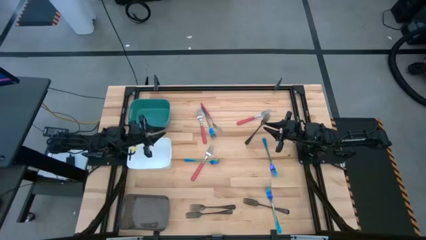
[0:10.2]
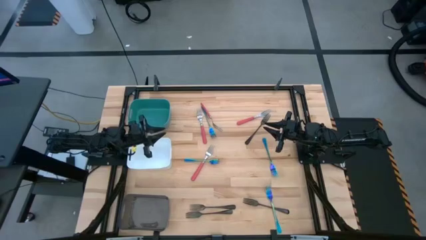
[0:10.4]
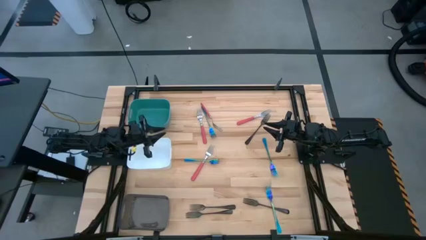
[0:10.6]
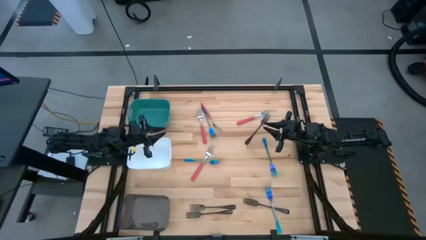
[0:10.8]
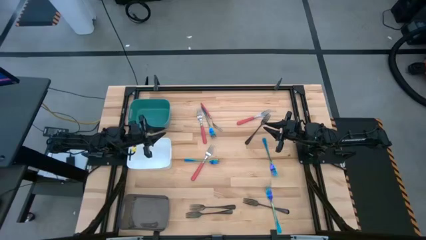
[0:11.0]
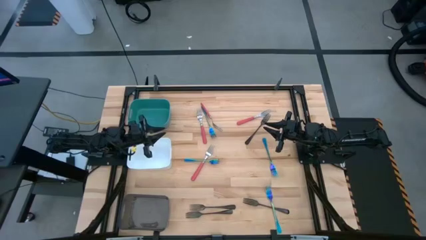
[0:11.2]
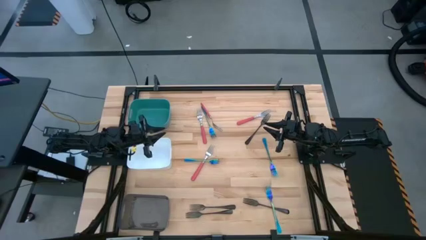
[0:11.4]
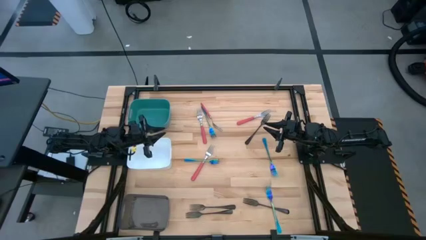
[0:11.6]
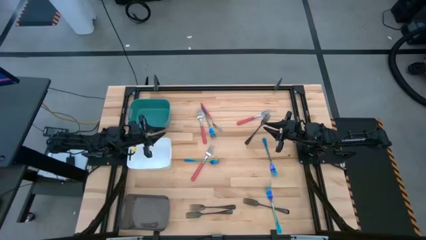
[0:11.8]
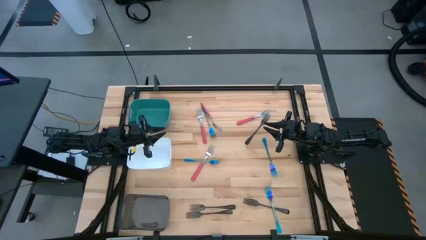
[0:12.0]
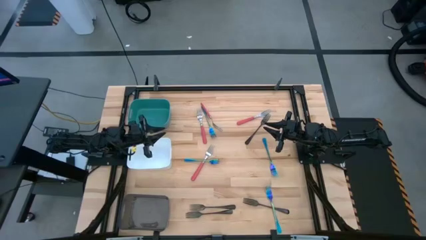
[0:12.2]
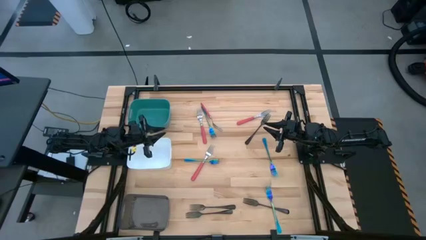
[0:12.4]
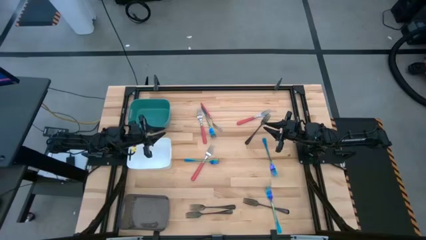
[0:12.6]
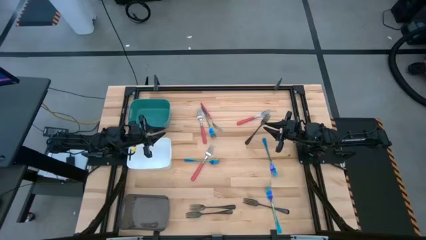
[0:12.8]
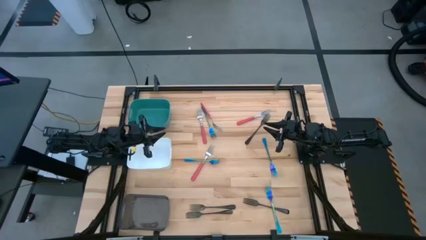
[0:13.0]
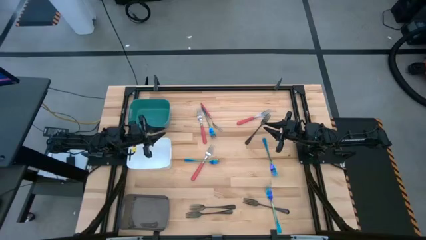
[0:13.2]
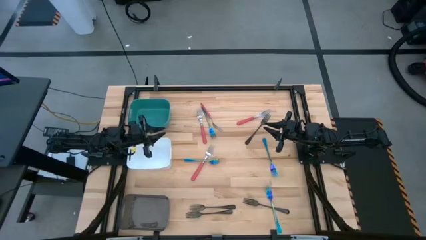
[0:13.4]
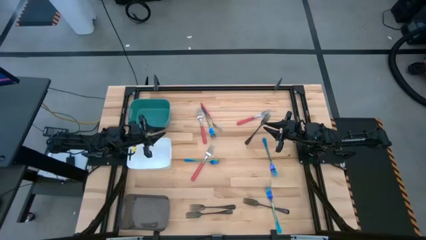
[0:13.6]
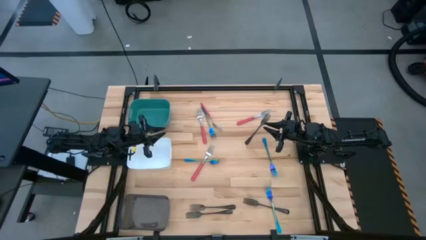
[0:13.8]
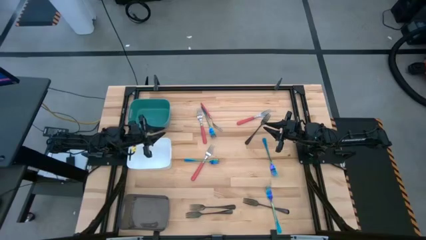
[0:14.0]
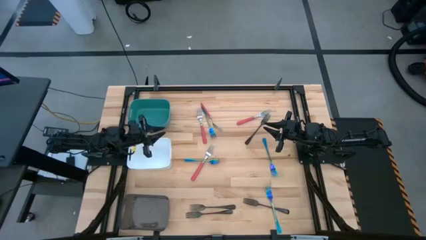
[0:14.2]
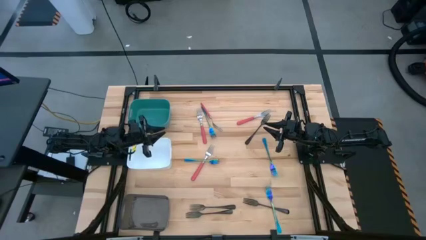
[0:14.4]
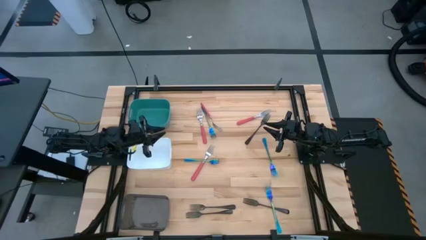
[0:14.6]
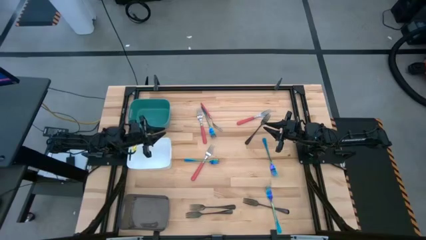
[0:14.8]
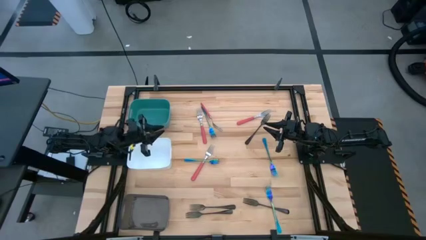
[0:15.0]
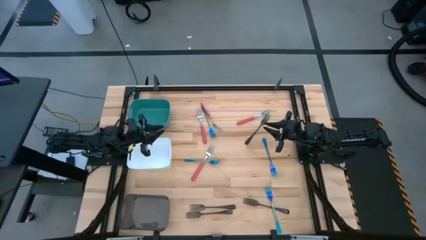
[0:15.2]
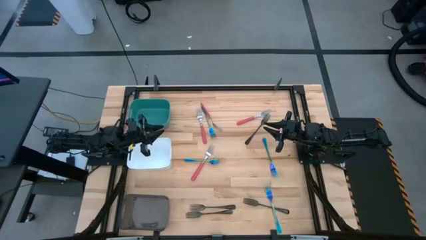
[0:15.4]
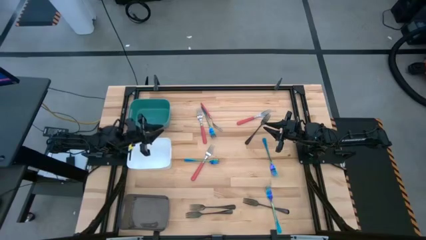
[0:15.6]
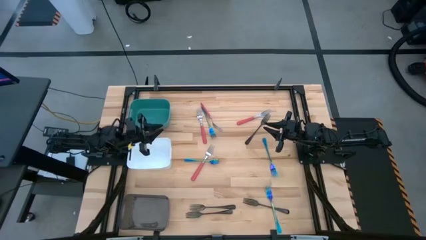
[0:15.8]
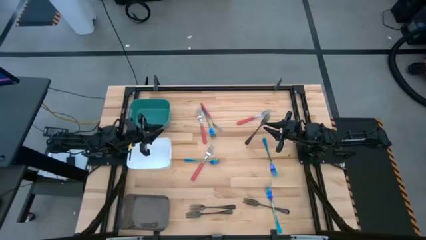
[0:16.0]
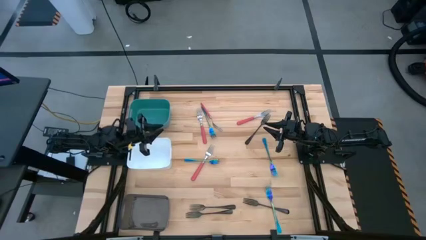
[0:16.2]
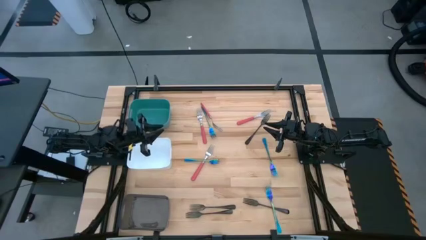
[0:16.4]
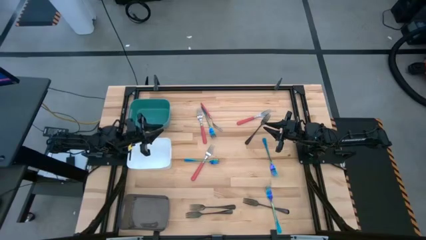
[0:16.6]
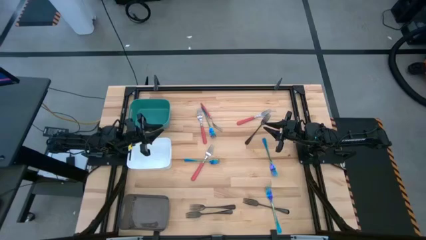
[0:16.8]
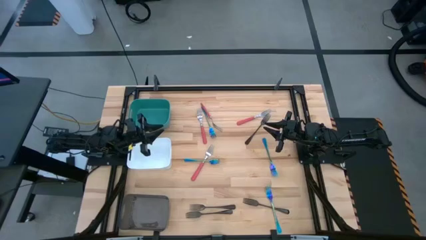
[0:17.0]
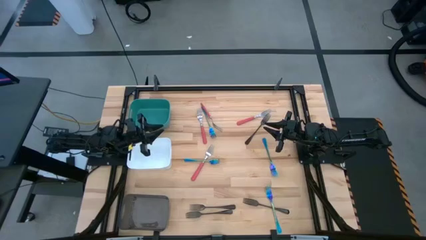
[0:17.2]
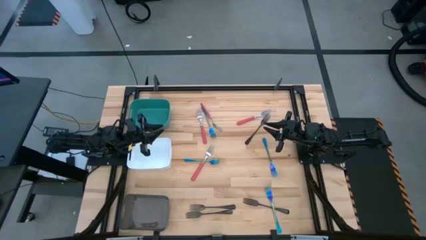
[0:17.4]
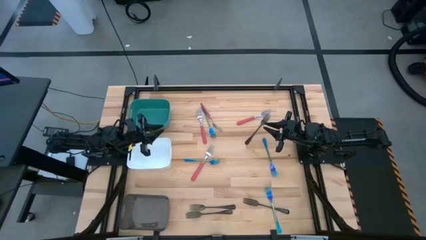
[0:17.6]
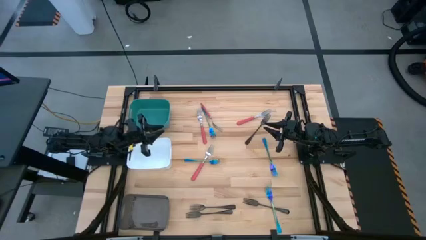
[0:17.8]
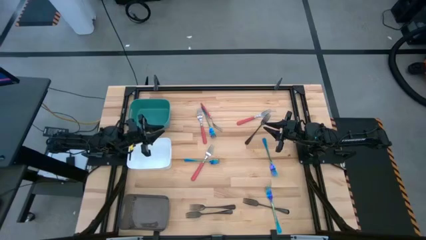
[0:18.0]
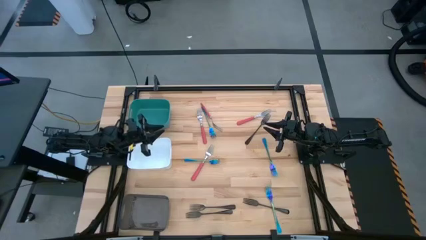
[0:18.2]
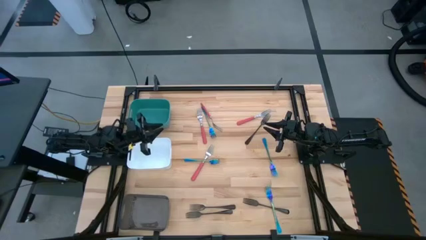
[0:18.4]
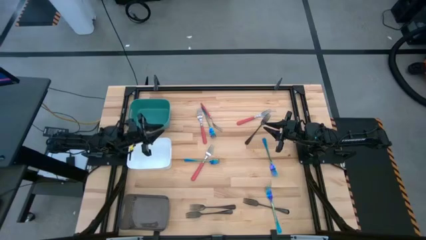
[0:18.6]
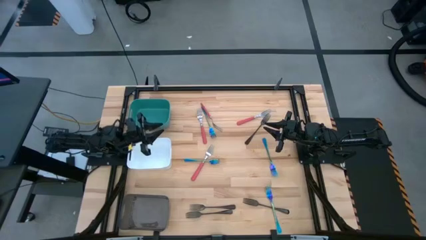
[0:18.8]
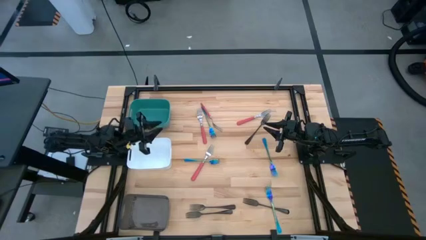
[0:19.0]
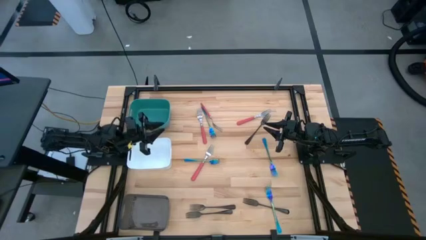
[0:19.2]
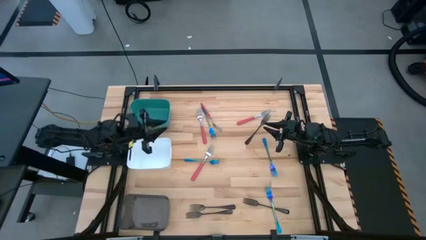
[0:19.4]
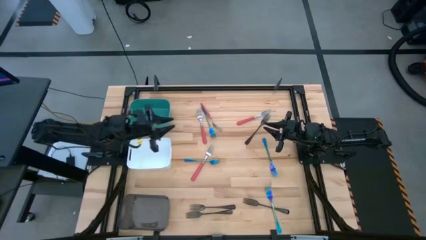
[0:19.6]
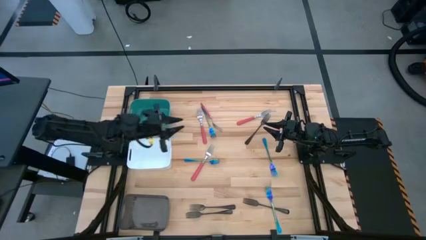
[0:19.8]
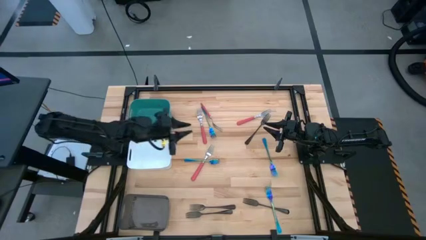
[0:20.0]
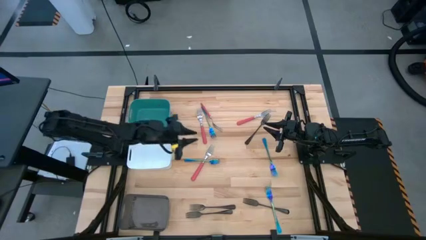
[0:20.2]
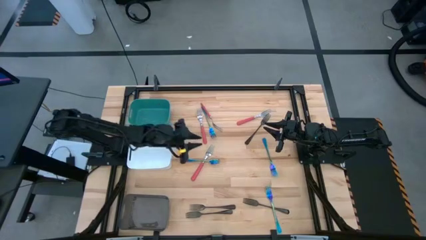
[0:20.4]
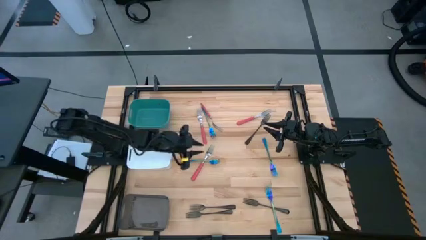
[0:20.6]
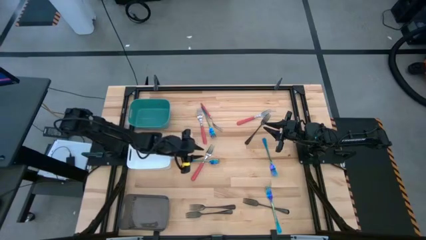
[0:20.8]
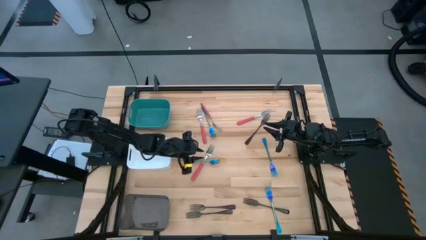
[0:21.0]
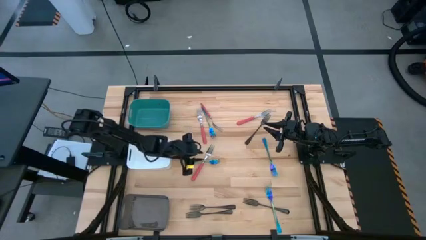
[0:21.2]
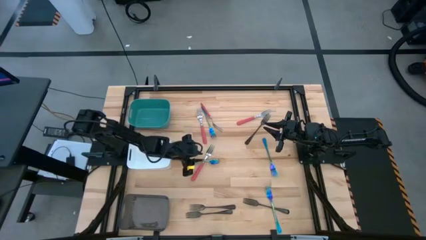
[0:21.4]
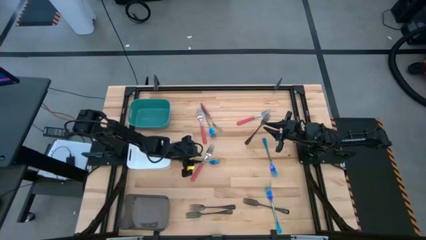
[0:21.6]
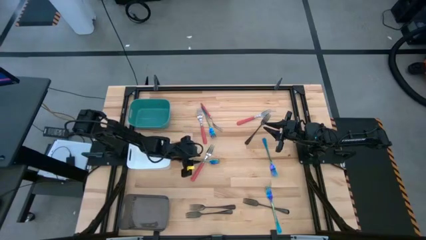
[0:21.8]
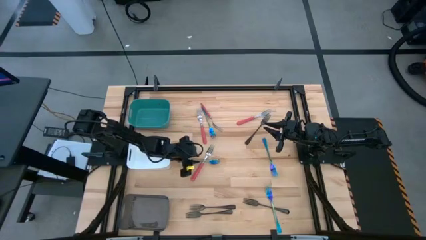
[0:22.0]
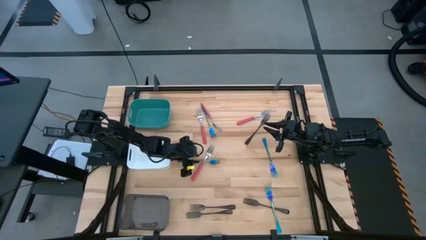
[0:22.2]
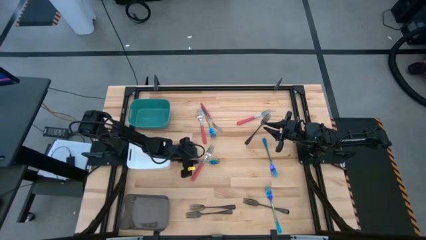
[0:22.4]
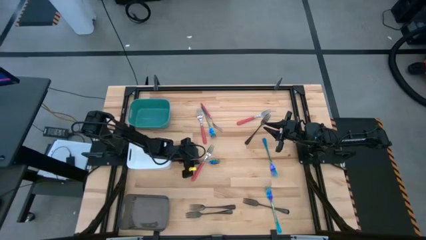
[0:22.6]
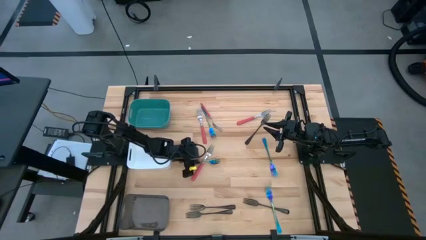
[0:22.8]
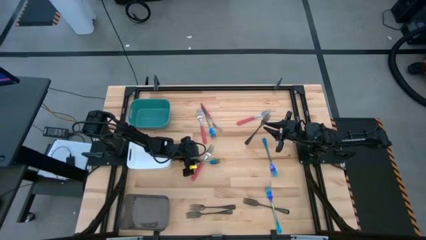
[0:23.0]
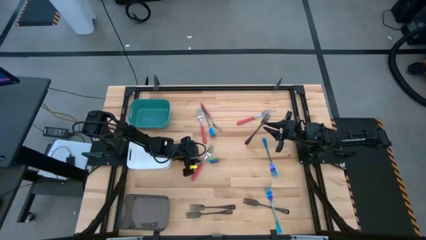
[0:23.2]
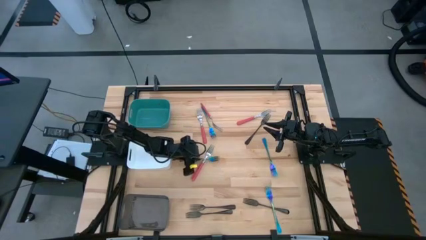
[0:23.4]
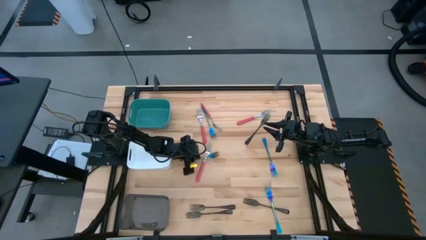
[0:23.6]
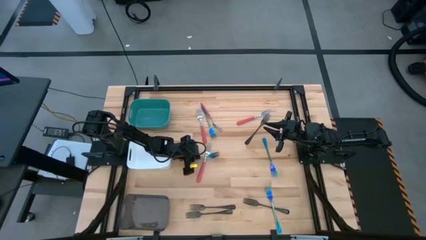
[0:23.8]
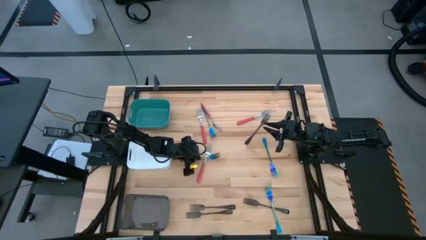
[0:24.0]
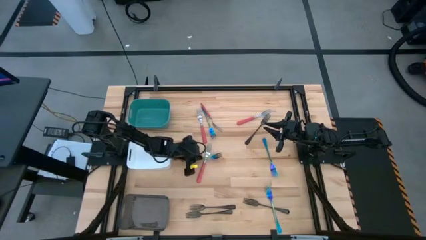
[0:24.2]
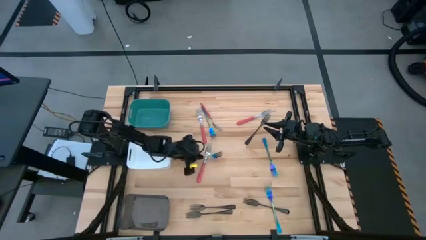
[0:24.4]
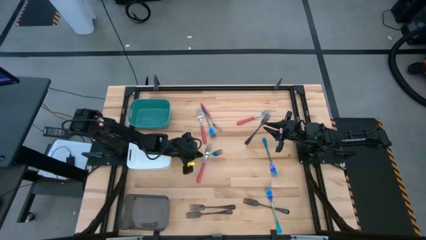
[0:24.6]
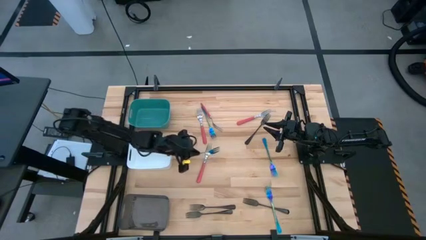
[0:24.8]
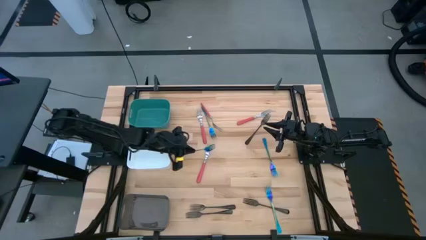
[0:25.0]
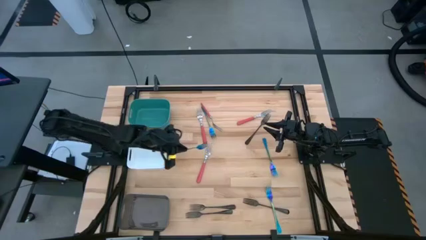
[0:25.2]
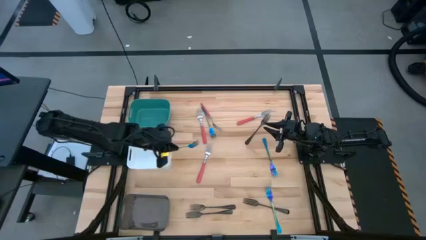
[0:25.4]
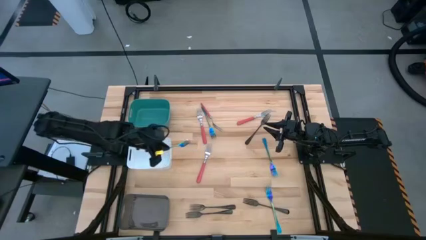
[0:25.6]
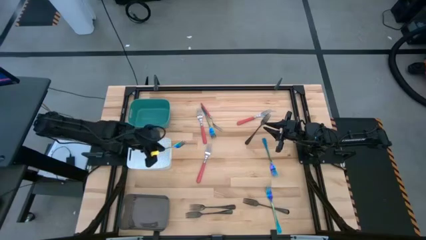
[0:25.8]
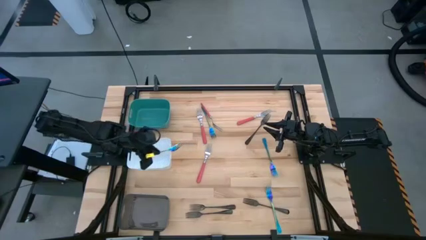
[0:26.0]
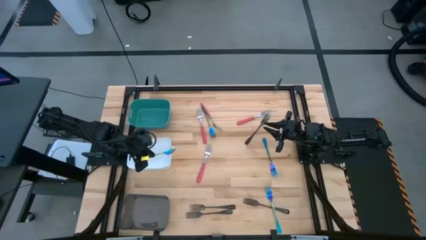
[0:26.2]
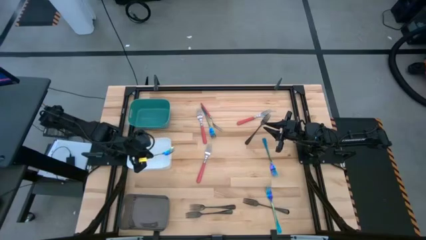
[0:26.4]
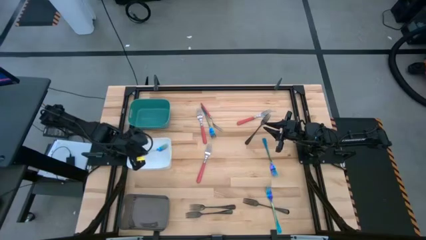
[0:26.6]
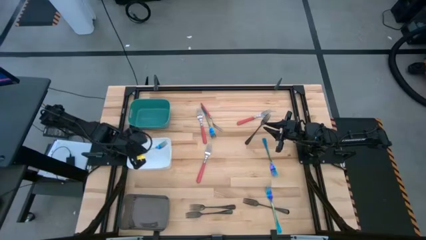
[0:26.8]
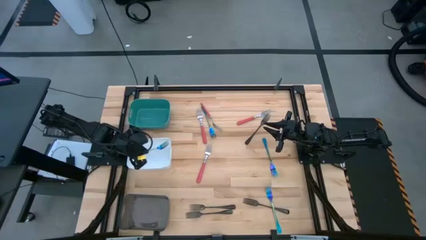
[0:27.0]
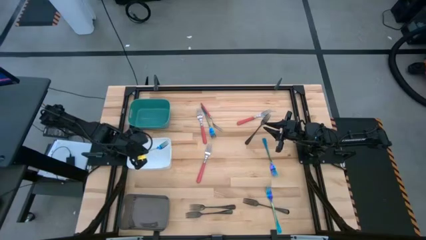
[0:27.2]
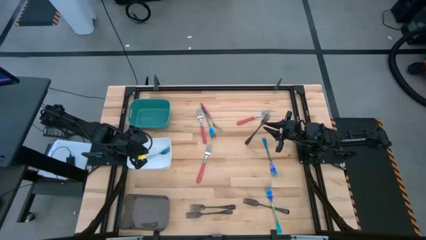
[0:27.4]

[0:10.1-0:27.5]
Task: Sort silverware by color (type)
Put the blue fork into the white bin
